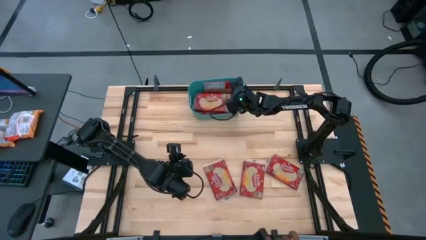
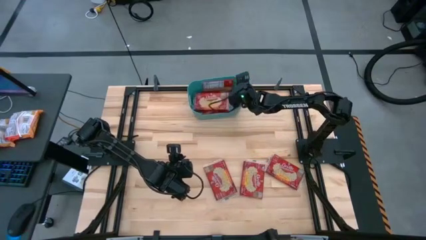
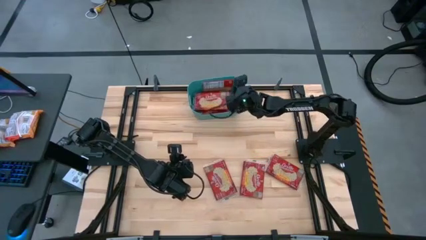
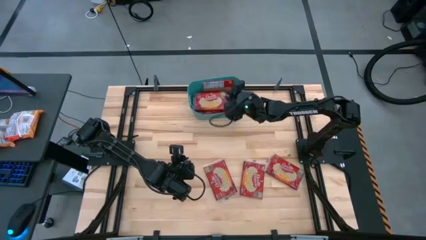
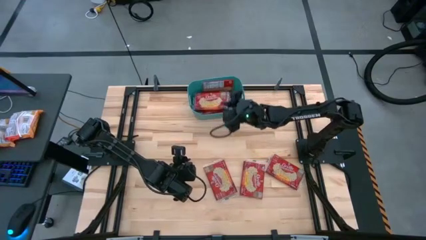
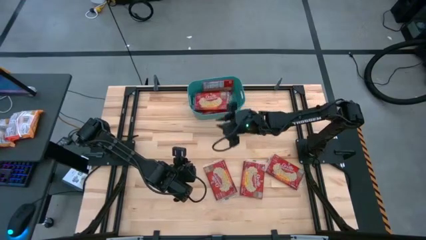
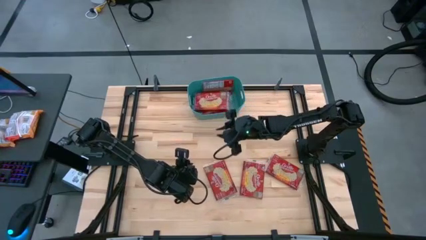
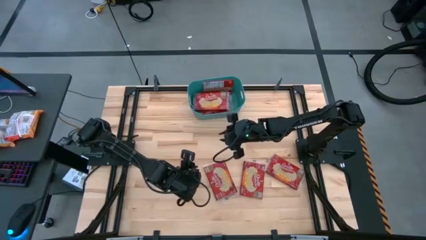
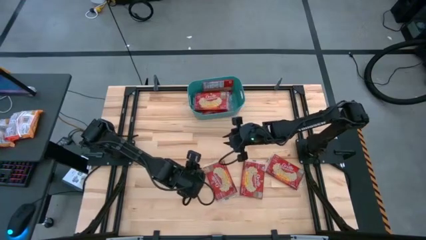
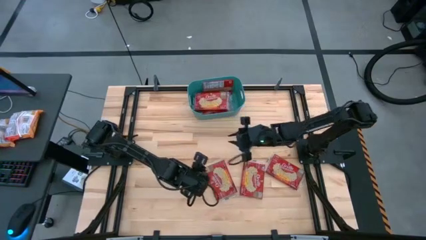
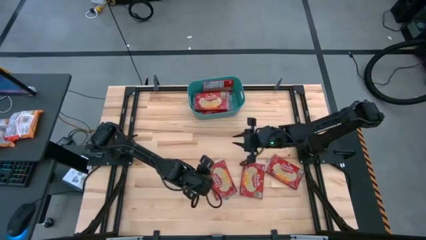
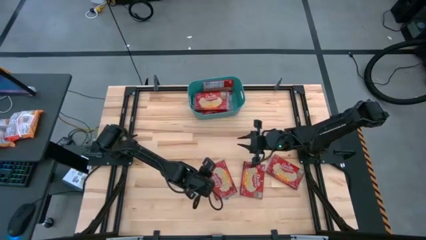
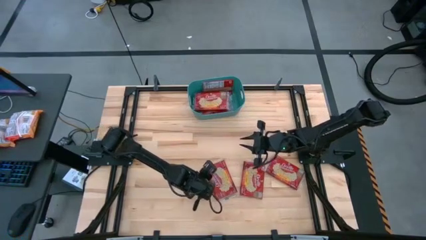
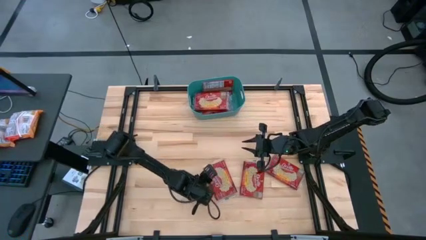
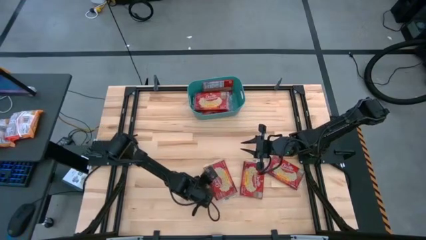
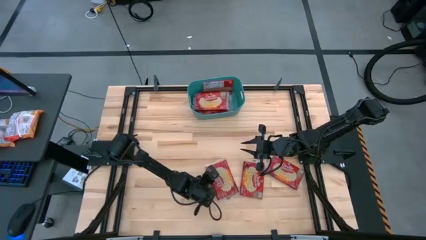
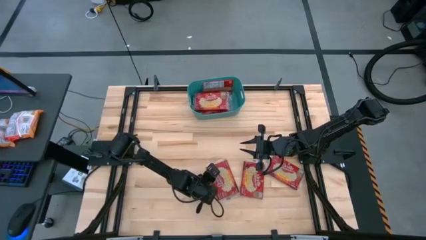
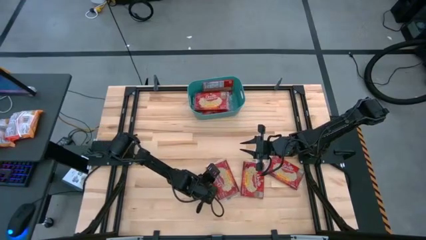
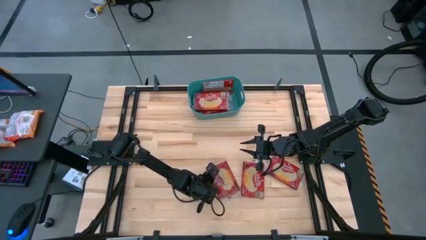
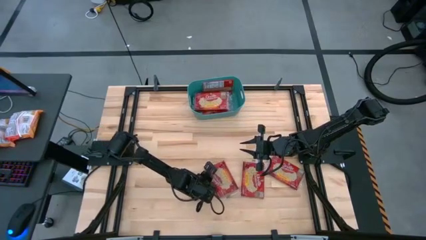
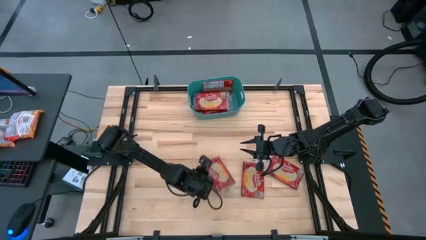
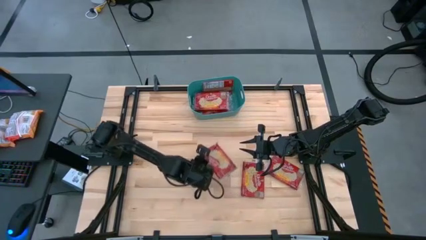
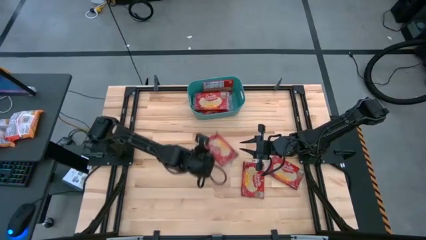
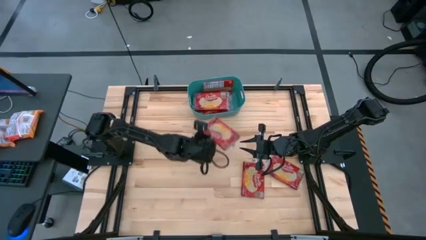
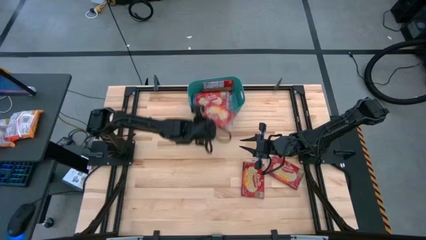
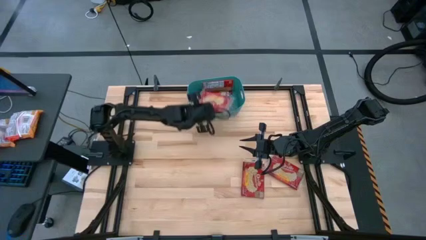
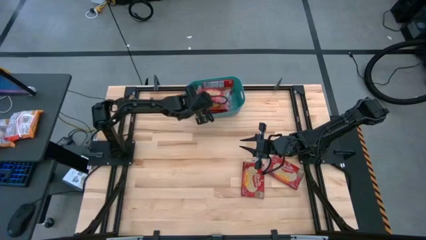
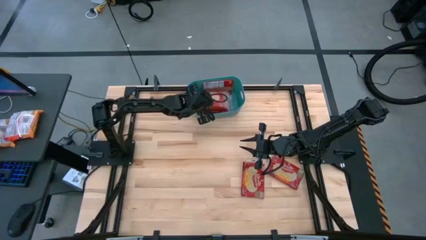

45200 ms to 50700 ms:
Task: Sort popcorn bags into baskets
Put the left red popcorn bag into the bin

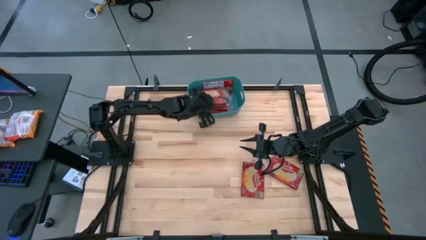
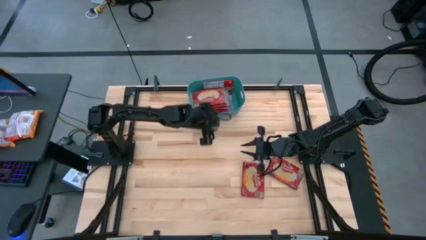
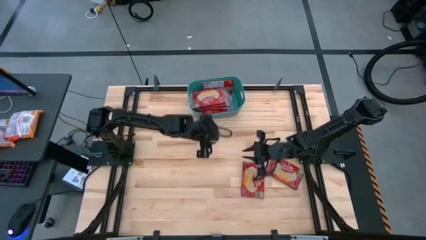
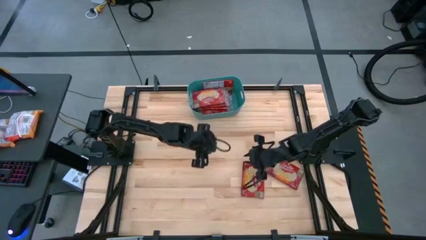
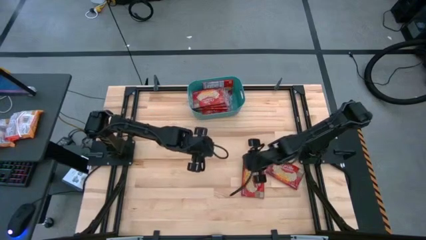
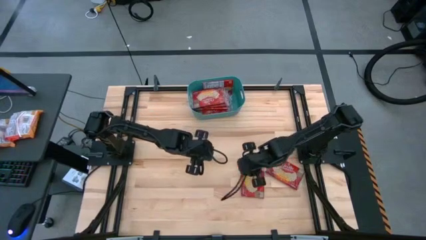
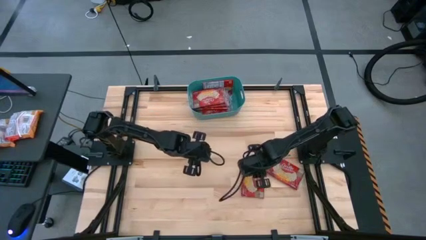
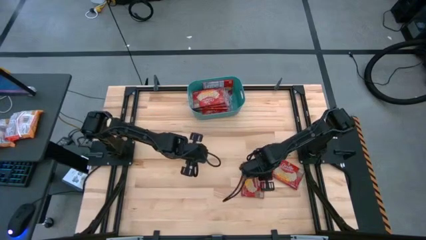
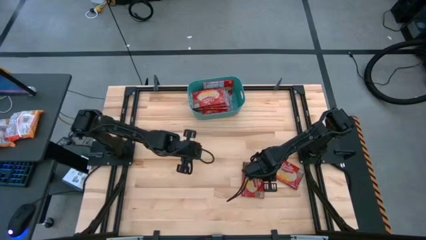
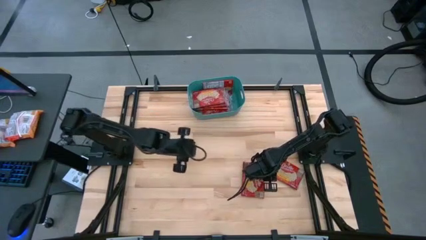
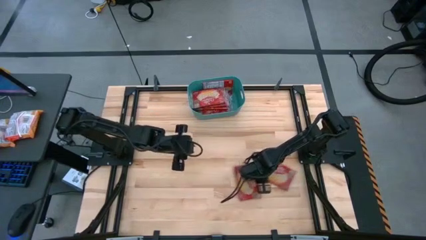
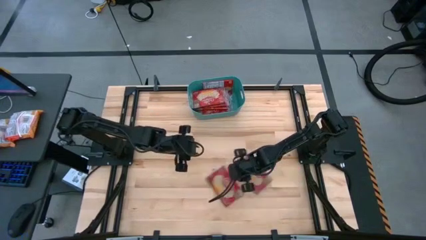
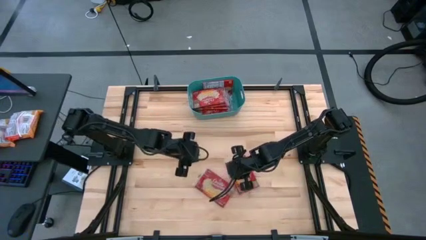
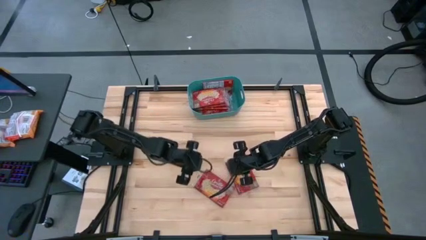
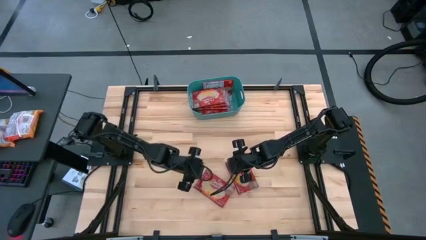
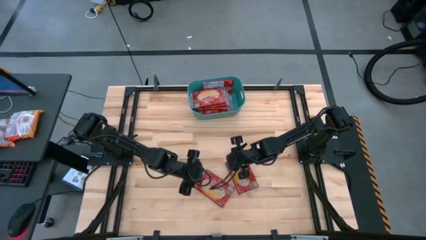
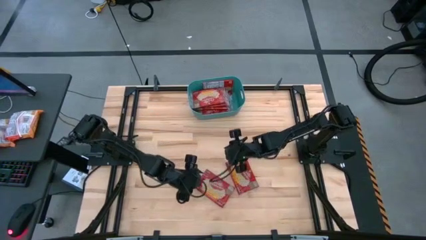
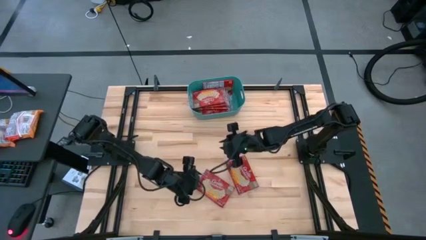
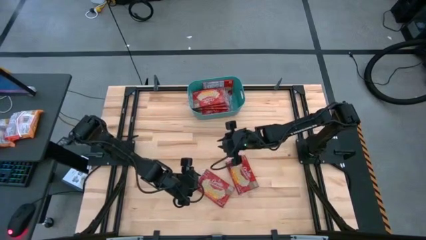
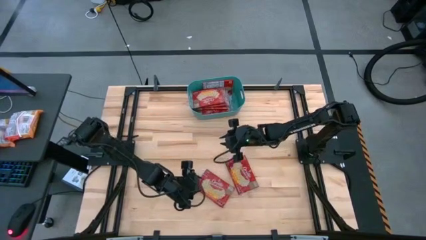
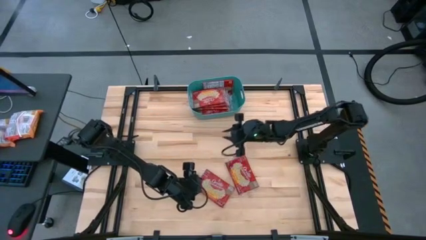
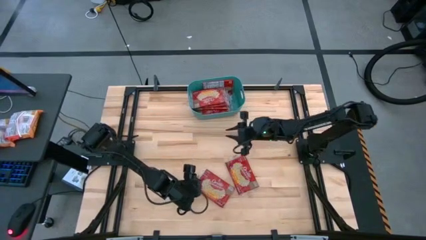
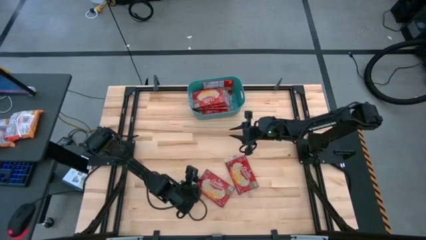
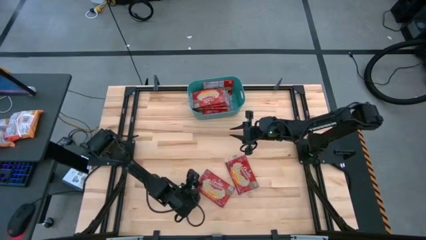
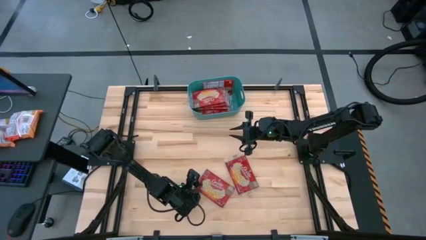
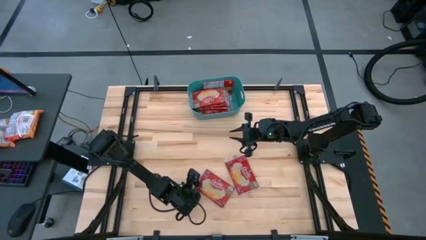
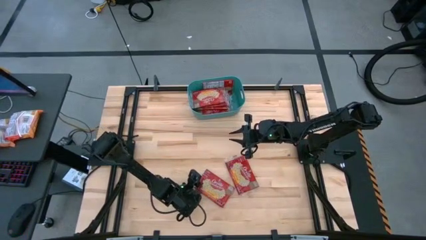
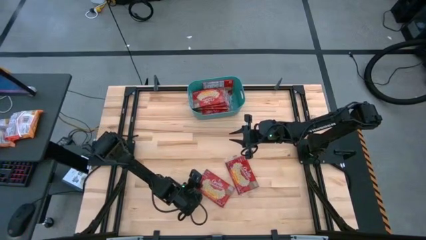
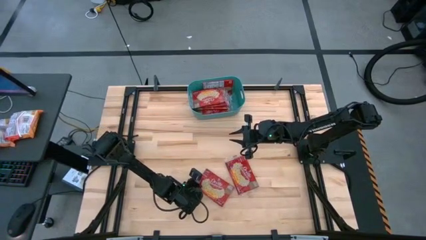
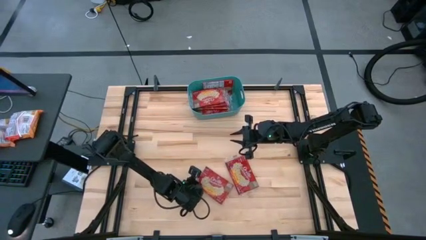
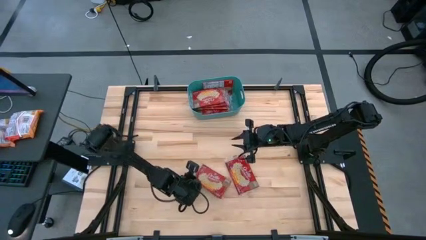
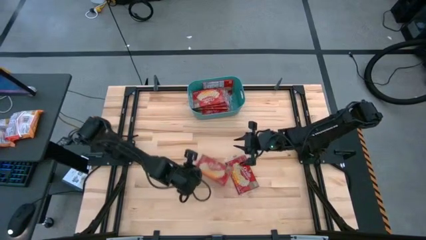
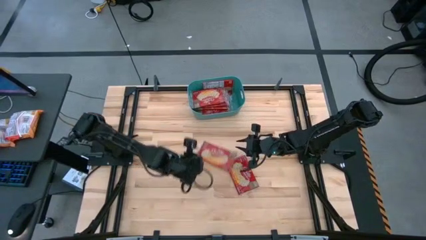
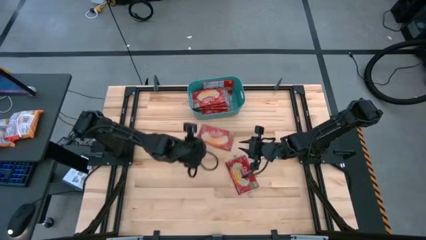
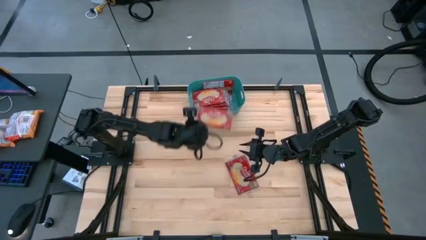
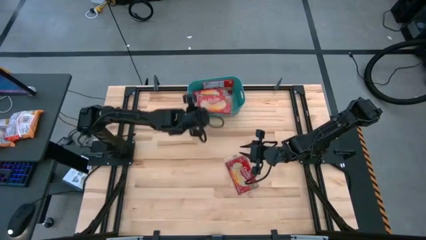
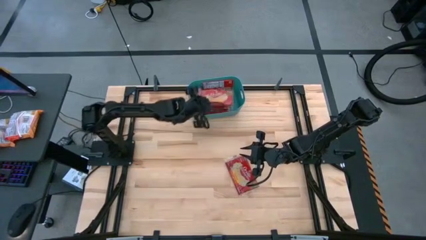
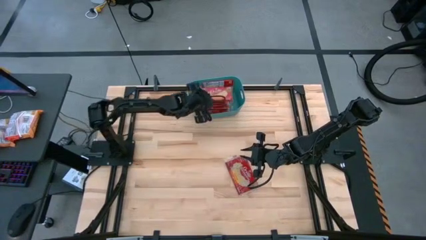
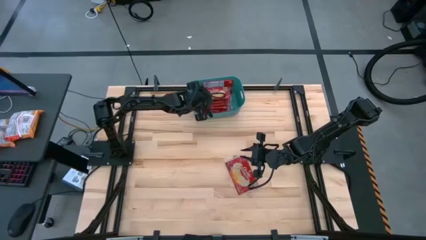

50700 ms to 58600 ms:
Put the left red popcorn bag into the bin

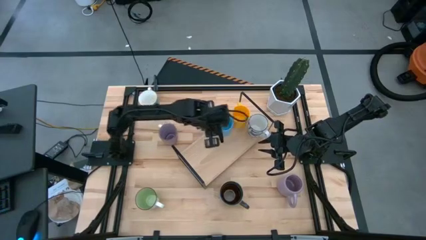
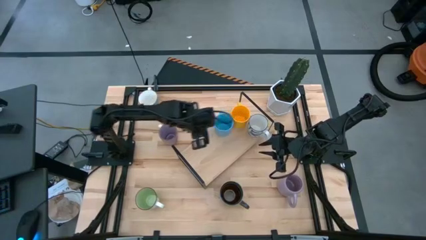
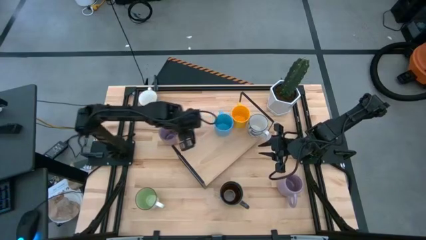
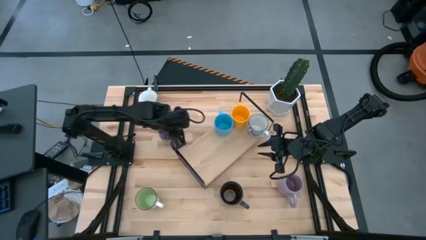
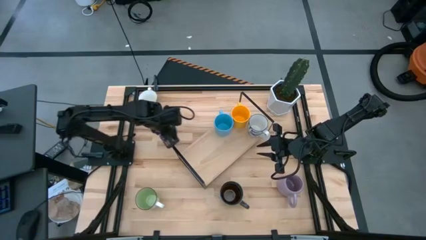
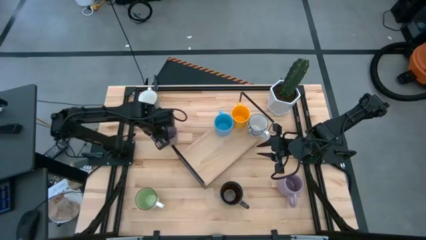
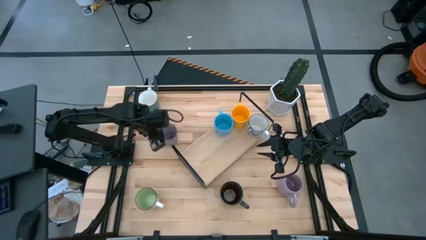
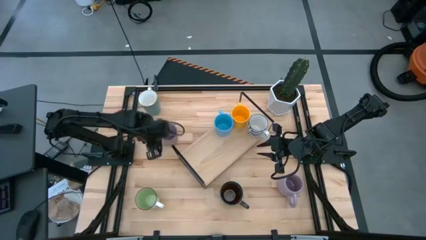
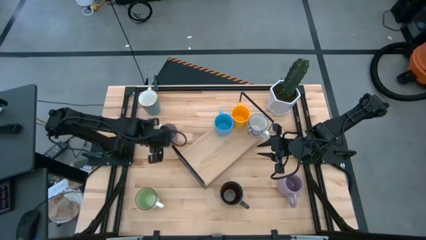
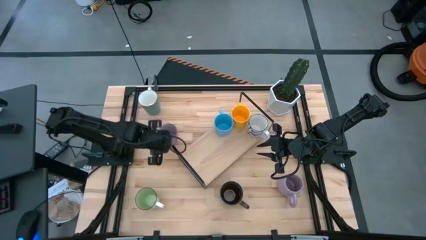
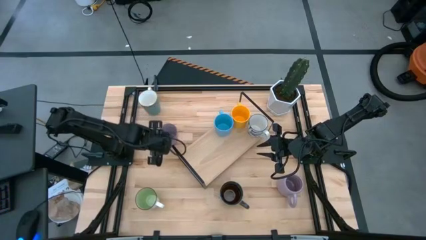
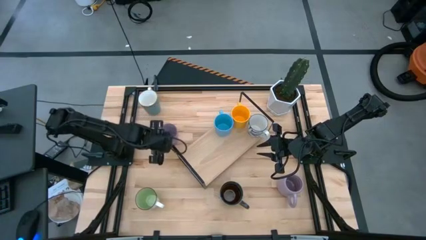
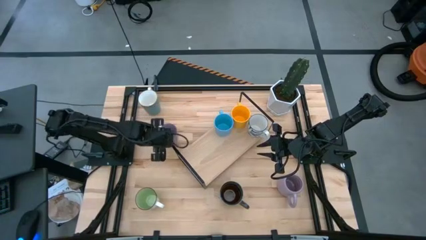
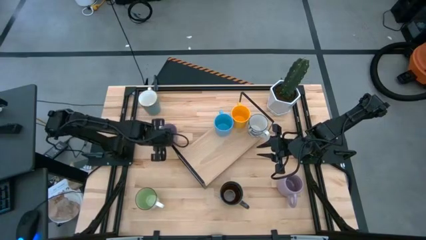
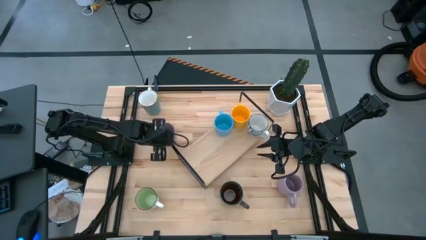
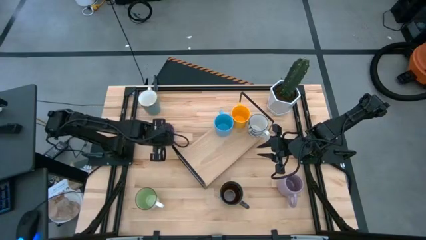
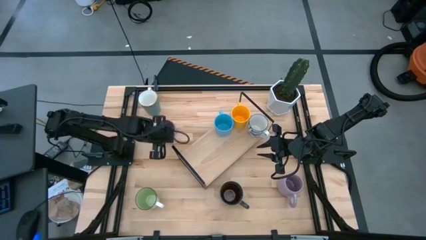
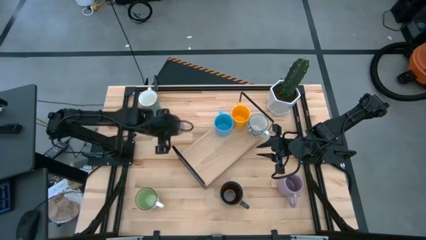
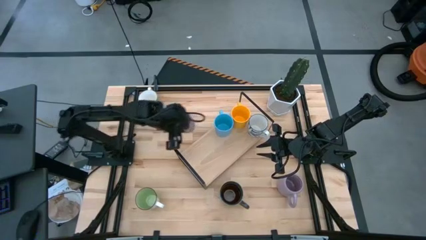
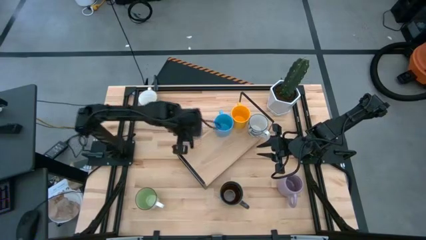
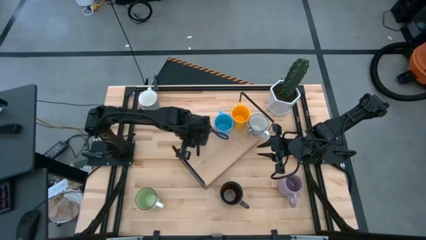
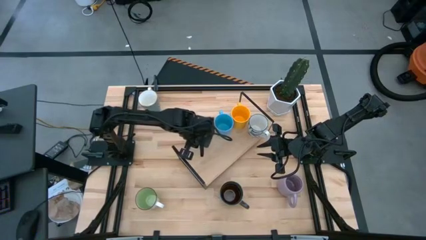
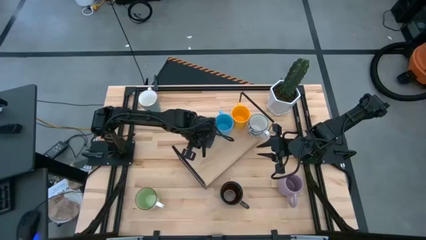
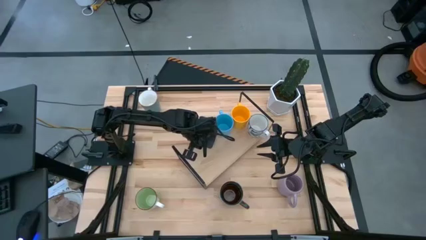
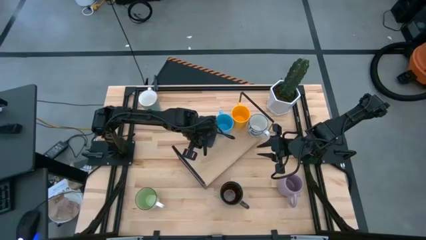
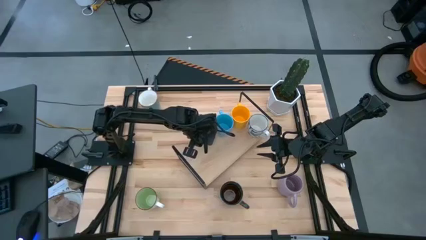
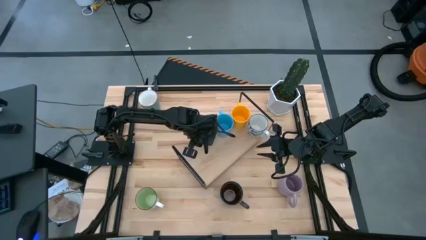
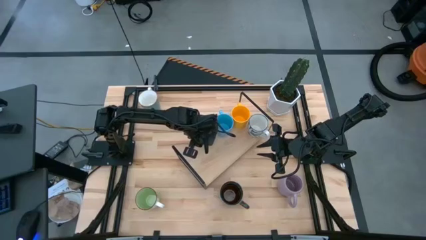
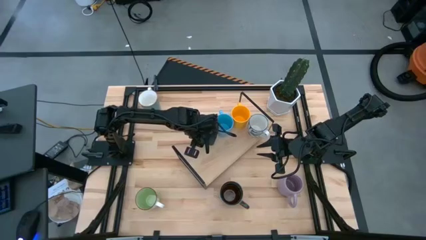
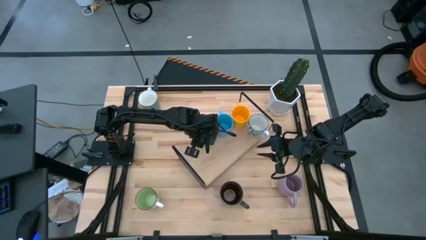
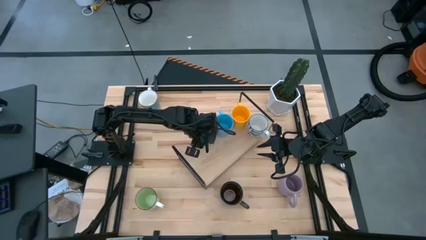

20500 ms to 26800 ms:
Task: Place coffee mugs
Put the purple/brown mug onto the shelf
